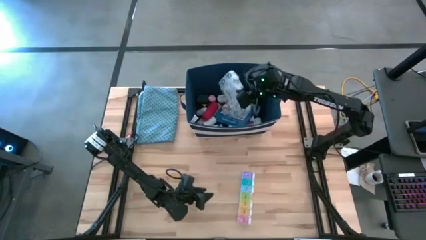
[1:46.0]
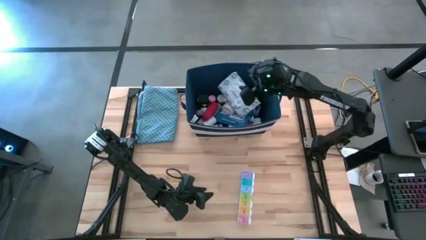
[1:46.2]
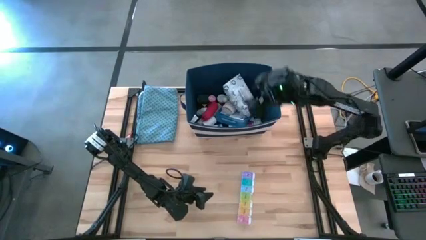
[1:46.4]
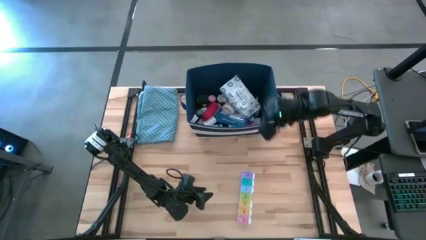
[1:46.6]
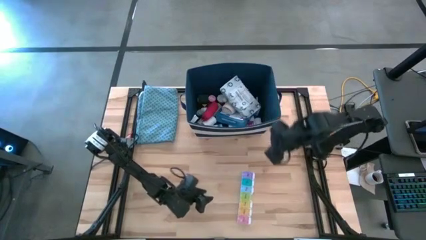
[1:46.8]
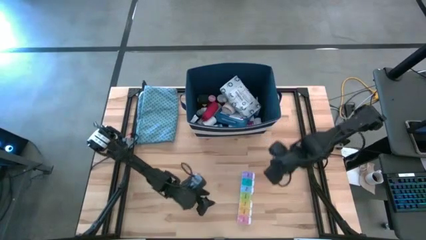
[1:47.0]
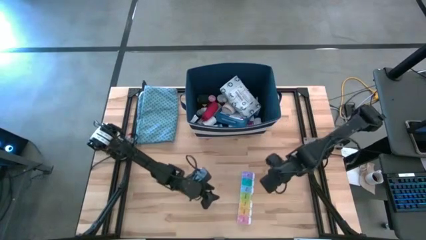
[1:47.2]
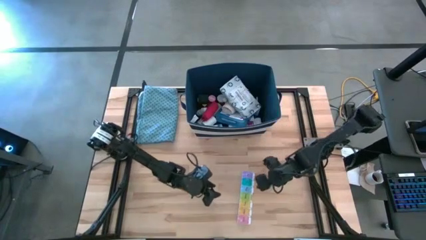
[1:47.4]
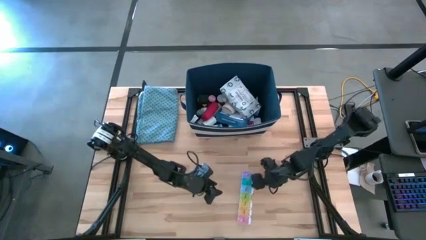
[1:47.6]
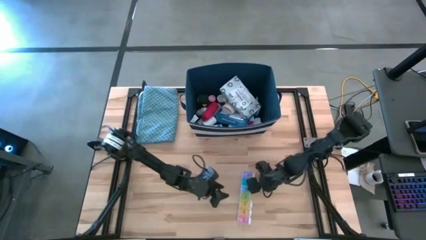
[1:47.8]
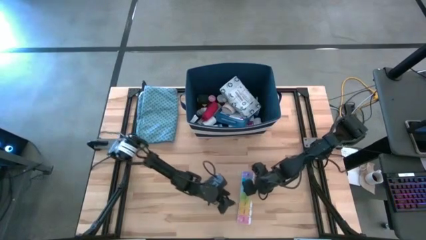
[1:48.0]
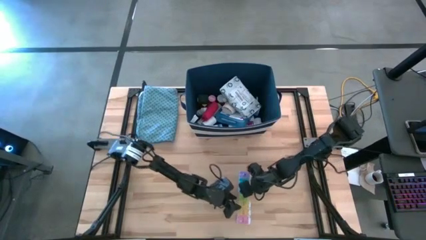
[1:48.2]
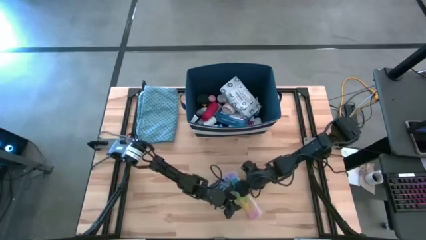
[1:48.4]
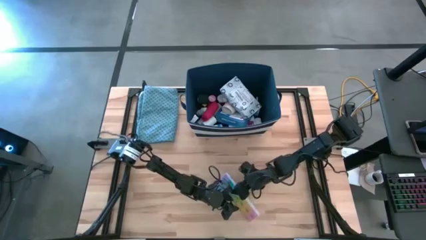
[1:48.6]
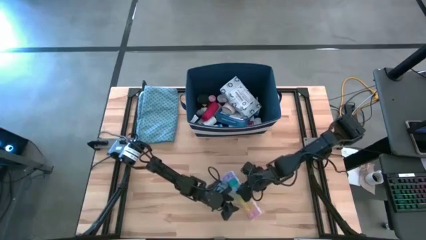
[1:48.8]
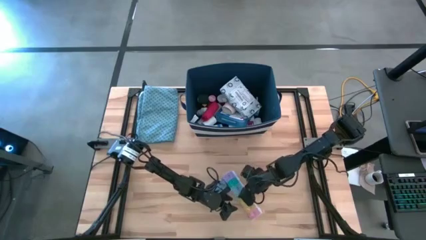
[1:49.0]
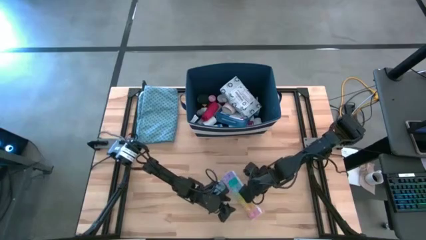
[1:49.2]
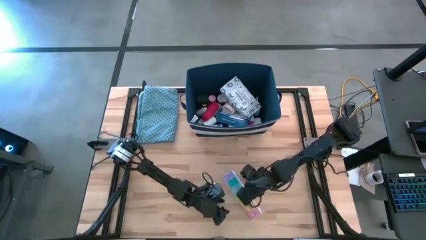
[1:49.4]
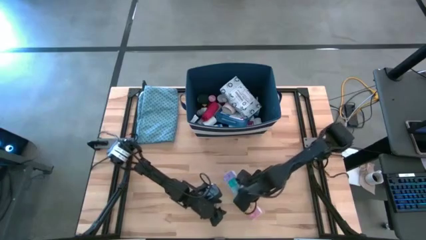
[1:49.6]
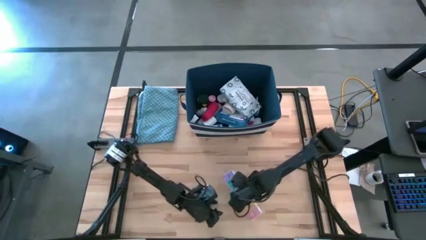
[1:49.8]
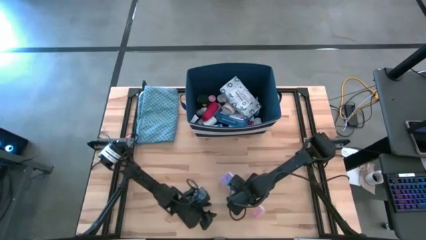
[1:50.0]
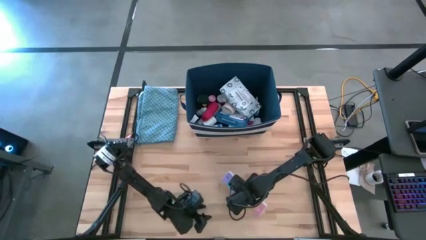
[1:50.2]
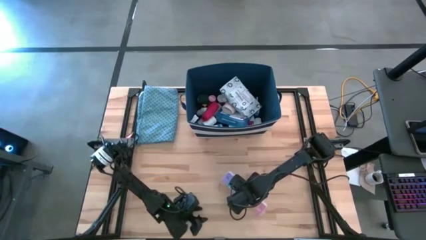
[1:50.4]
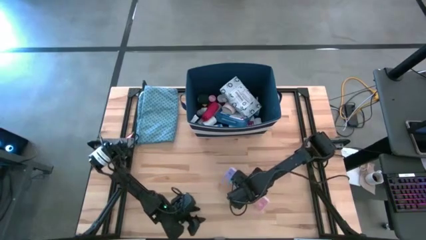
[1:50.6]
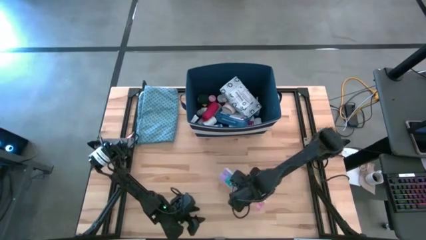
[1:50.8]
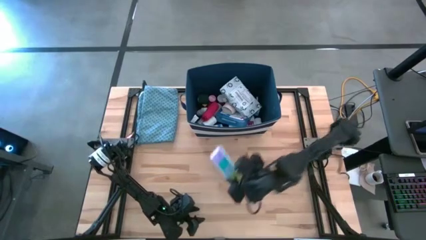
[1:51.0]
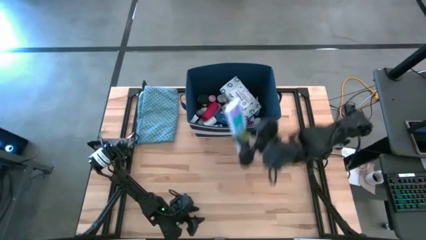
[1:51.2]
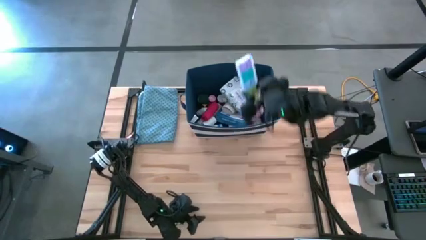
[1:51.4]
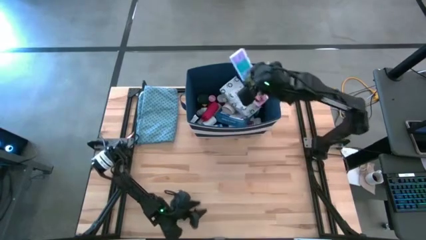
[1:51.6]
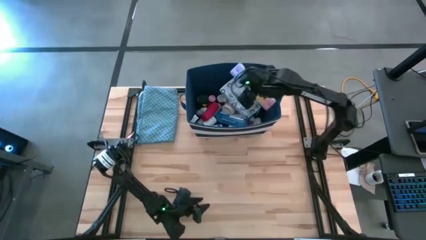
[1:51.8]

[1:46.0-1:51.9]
Task: Pick & place medical supplies in basket/bin
Put the medicine organizer into the blue bin

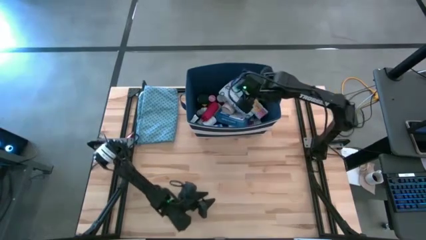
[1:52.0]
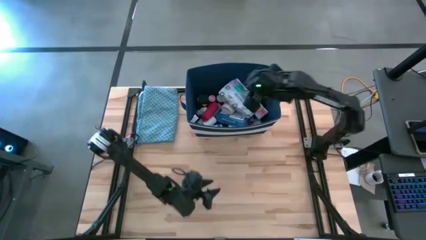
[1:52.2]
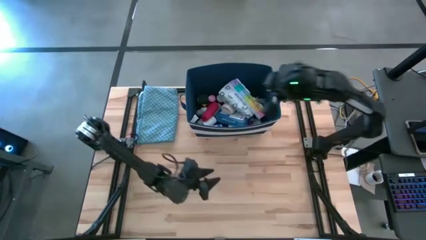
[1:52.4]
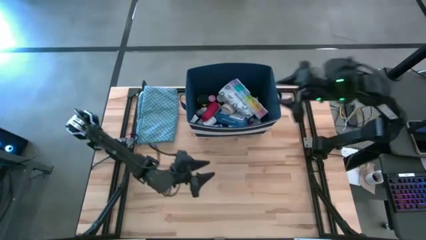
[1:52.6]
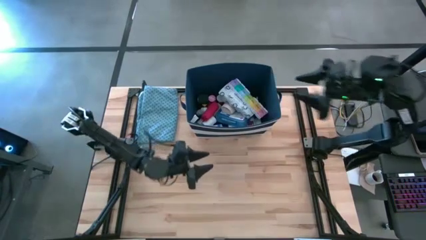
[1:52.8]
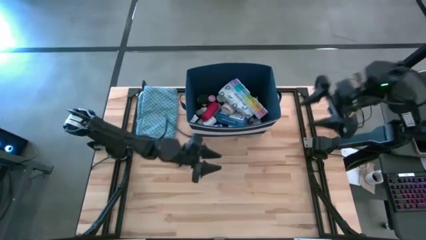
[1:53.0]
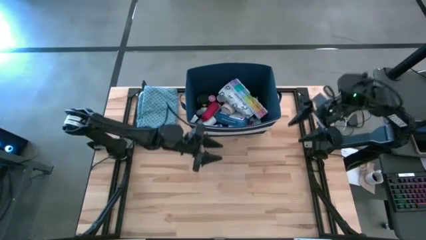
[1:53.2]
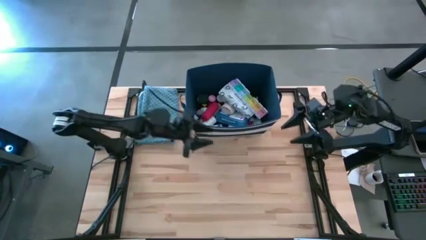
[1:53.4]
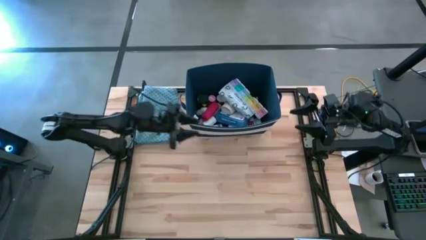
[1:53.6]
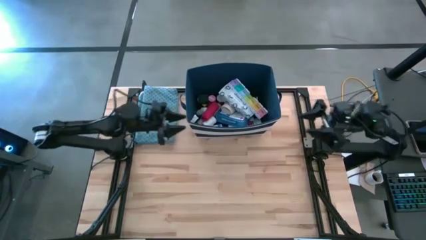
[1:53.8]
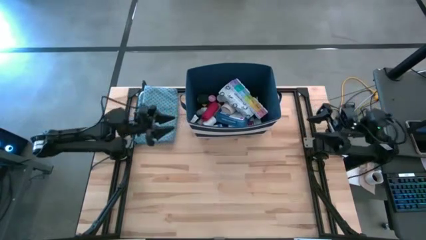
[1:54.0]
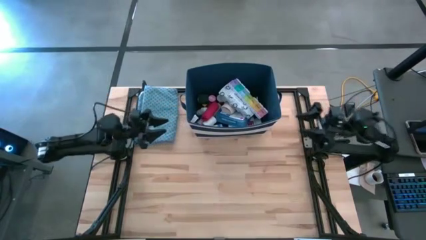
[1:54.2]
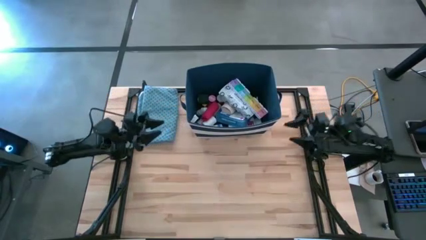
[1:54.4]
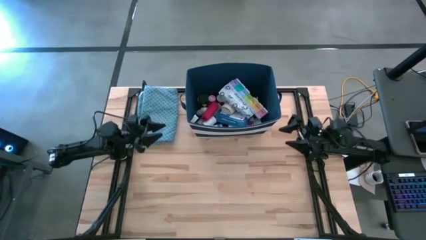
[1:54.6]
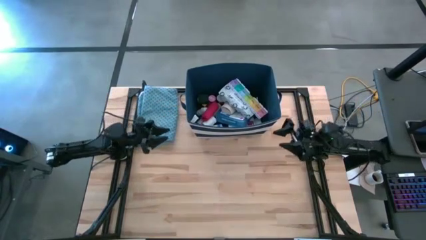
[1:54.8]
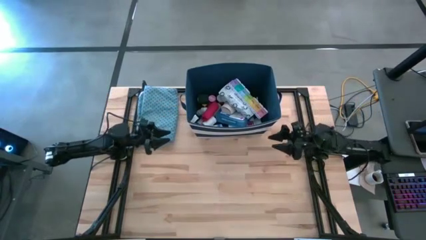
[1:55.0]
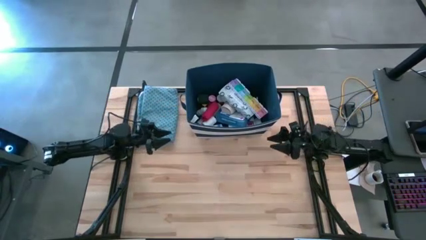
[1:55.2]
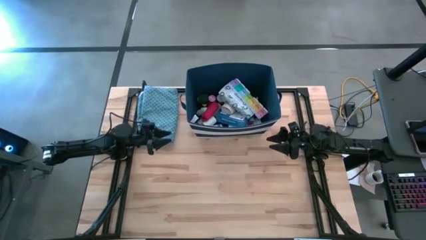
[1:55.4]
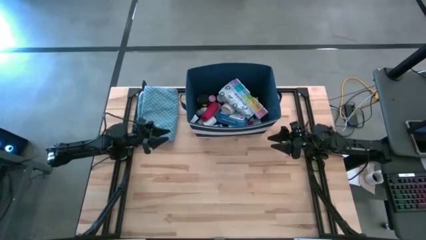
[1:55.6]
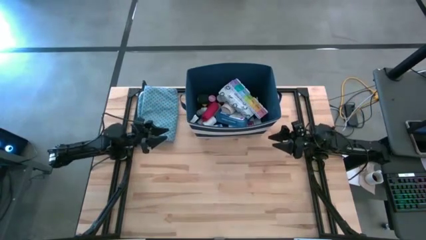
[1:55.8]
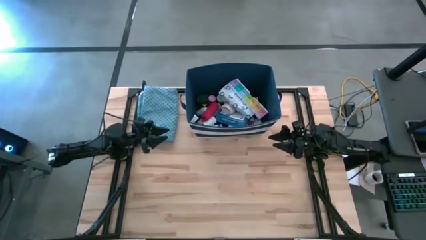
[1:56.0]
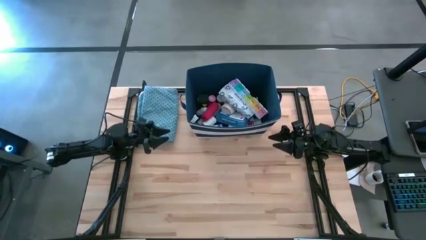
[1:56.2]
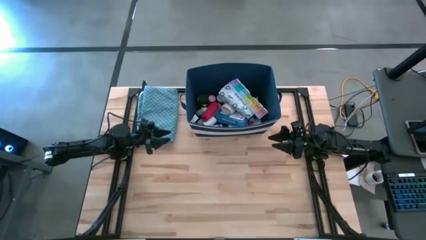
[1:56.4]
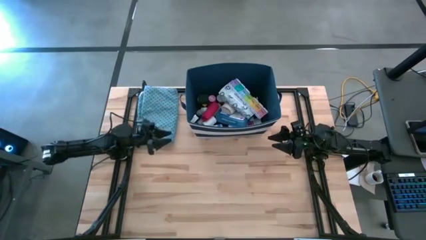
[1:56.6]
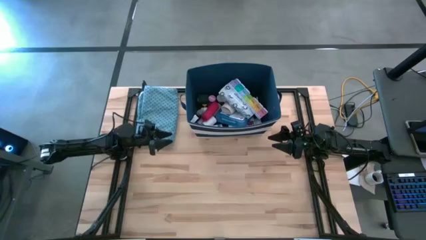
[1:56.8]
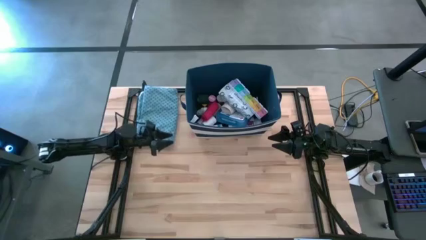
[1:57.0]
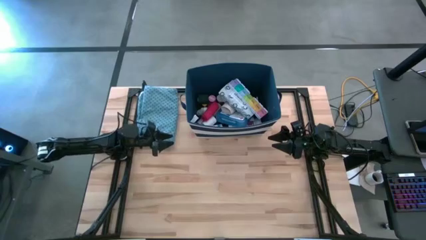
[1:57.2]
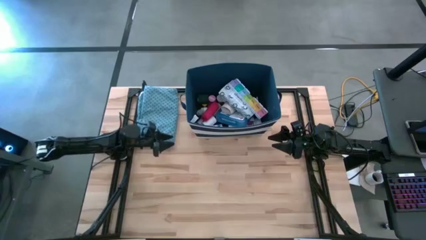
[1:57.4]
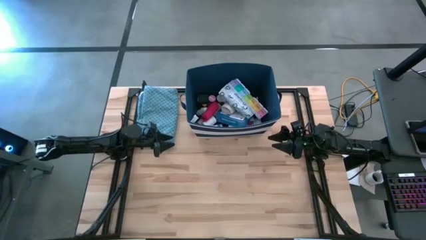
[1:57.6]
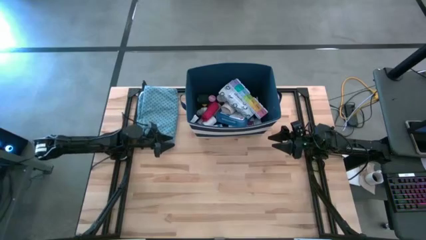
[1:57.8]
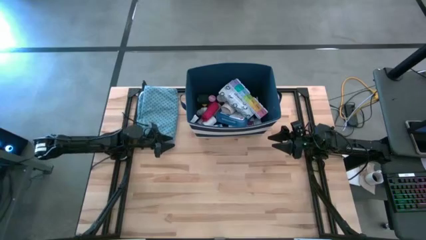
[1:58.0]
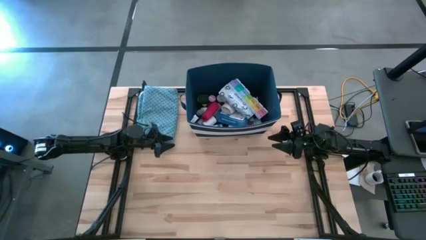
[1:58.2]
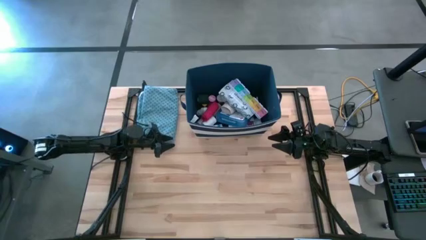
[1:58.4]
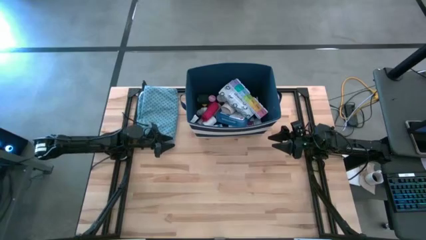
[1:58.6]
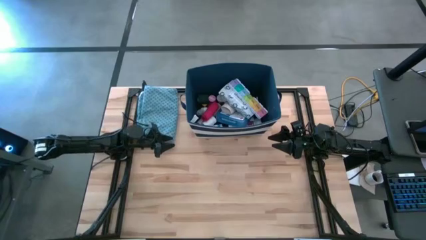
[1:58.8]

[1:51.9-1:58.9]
Return to Home Position
